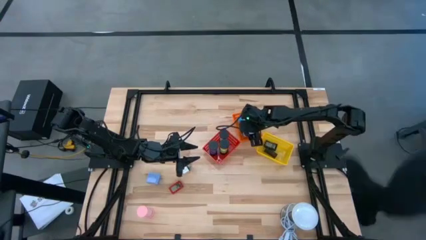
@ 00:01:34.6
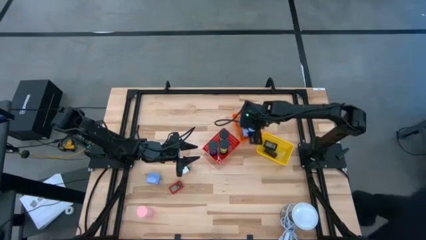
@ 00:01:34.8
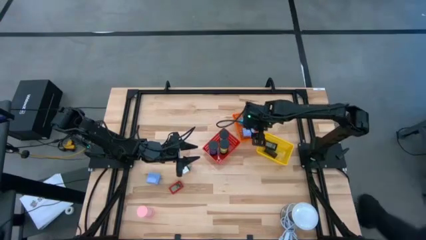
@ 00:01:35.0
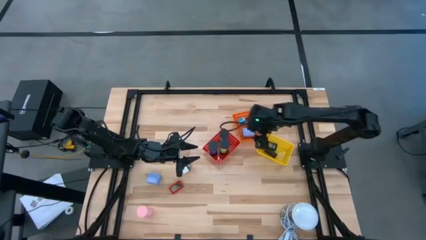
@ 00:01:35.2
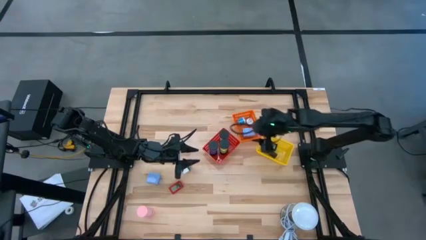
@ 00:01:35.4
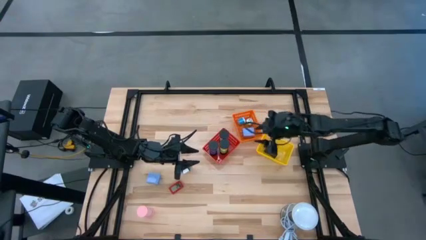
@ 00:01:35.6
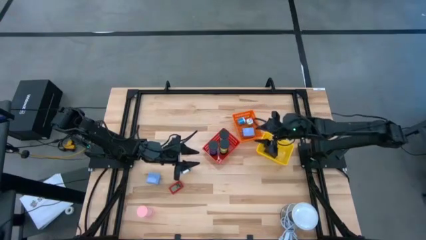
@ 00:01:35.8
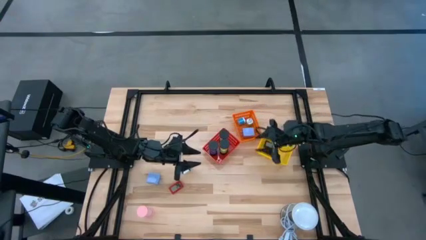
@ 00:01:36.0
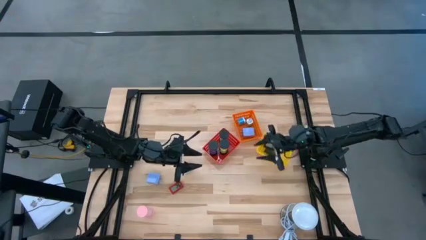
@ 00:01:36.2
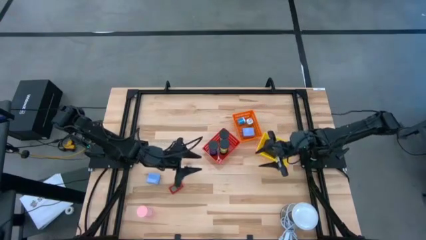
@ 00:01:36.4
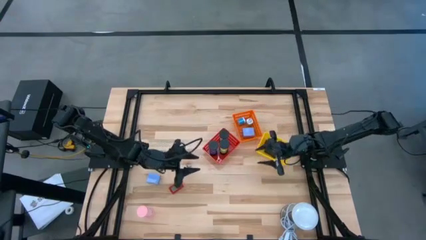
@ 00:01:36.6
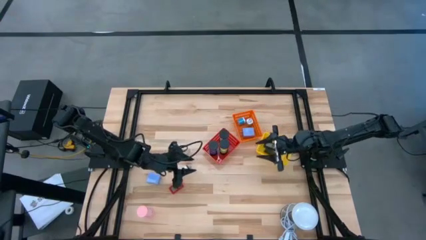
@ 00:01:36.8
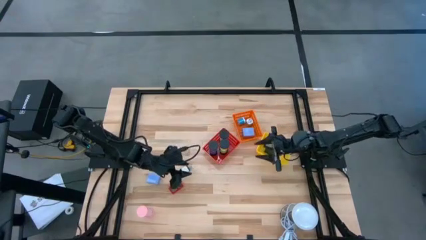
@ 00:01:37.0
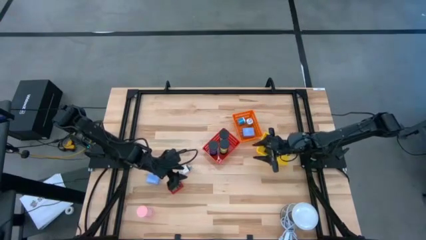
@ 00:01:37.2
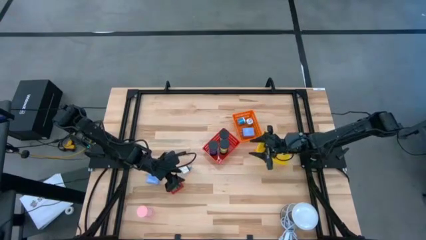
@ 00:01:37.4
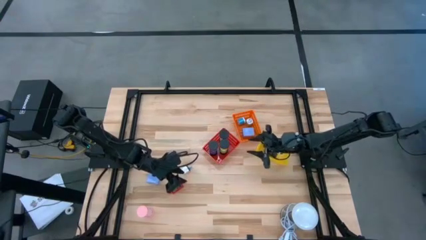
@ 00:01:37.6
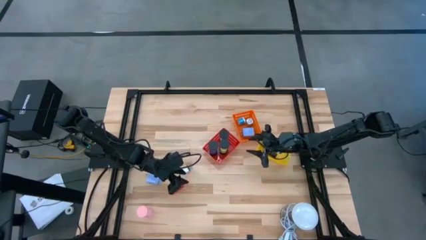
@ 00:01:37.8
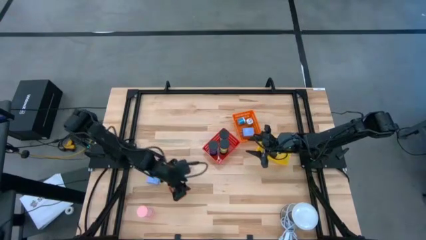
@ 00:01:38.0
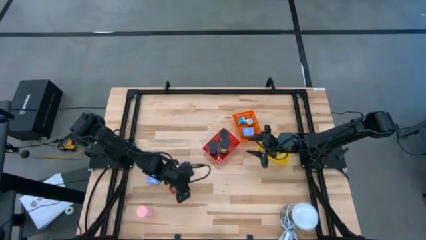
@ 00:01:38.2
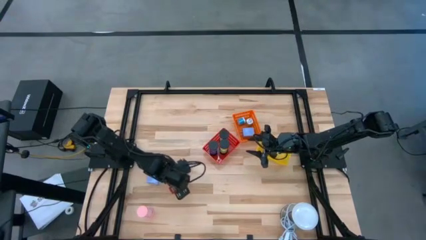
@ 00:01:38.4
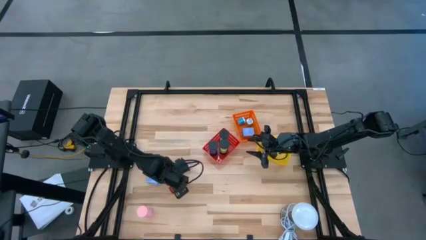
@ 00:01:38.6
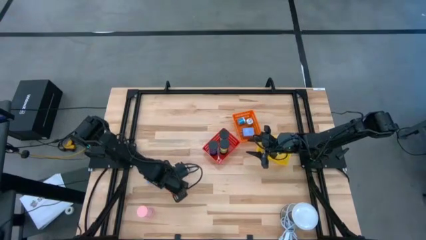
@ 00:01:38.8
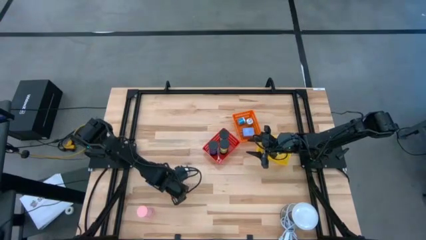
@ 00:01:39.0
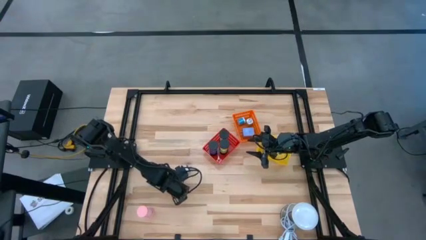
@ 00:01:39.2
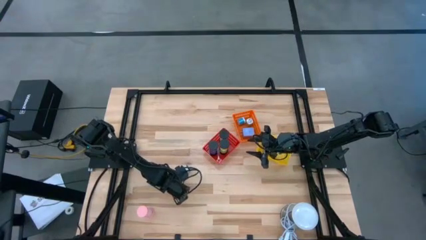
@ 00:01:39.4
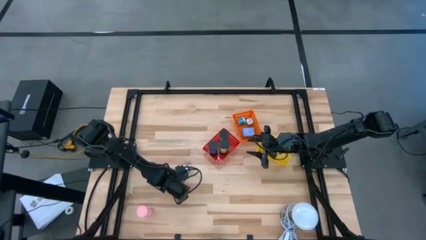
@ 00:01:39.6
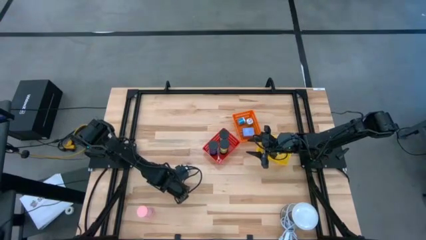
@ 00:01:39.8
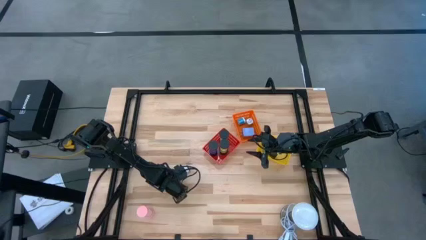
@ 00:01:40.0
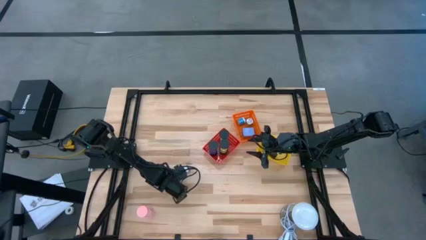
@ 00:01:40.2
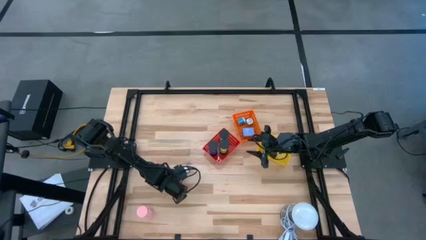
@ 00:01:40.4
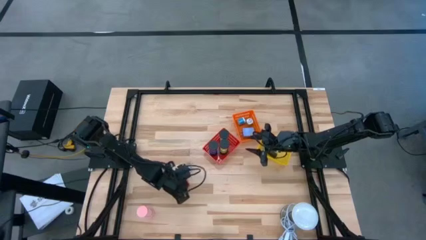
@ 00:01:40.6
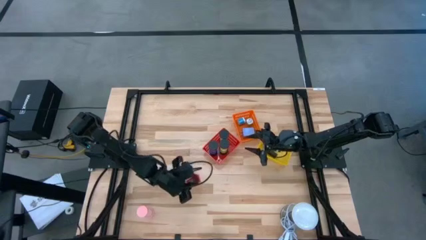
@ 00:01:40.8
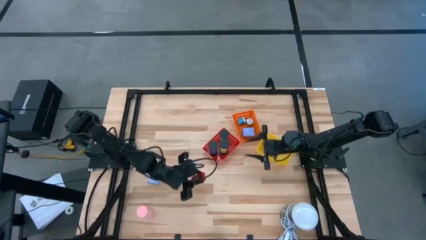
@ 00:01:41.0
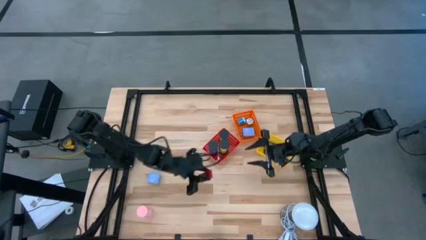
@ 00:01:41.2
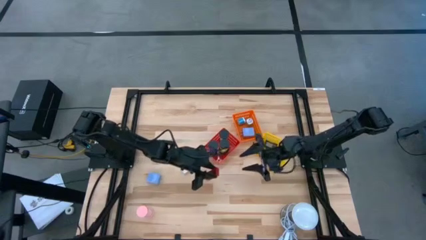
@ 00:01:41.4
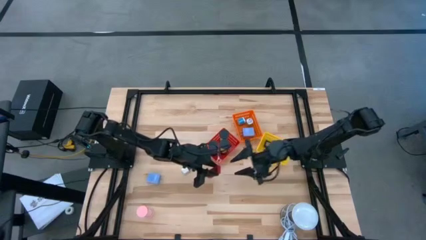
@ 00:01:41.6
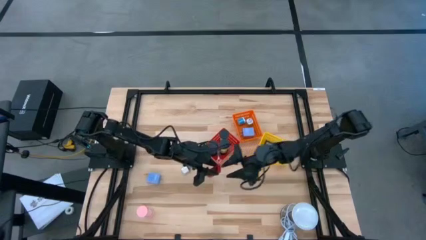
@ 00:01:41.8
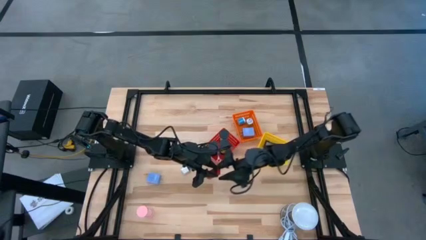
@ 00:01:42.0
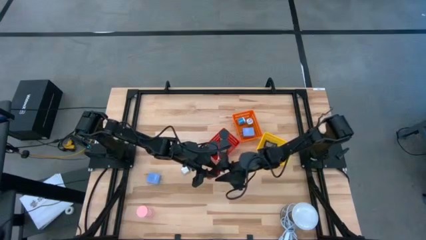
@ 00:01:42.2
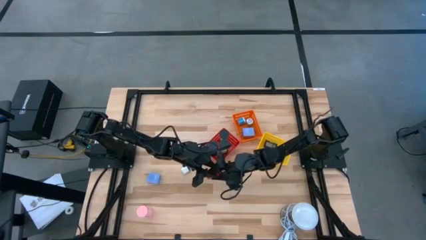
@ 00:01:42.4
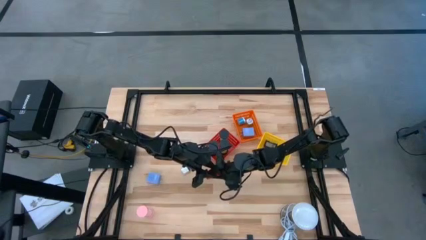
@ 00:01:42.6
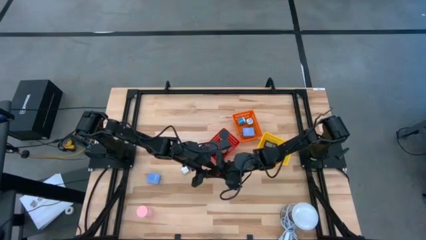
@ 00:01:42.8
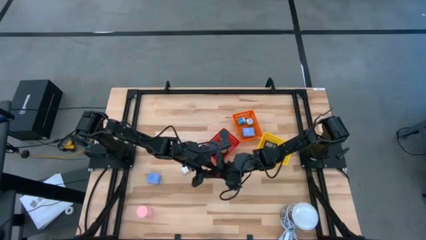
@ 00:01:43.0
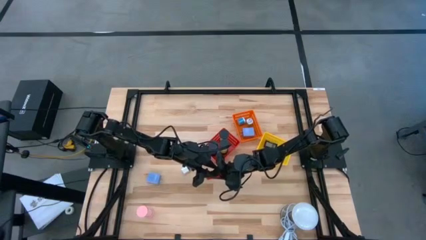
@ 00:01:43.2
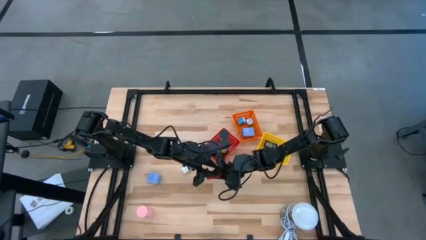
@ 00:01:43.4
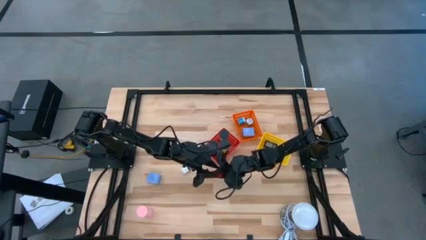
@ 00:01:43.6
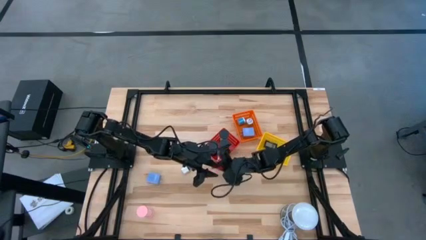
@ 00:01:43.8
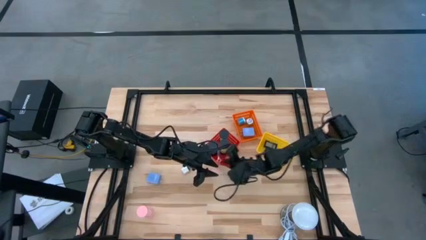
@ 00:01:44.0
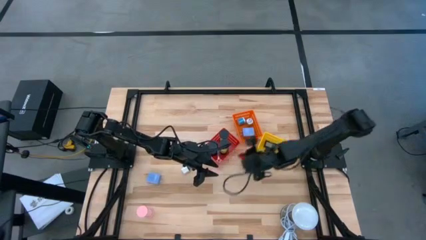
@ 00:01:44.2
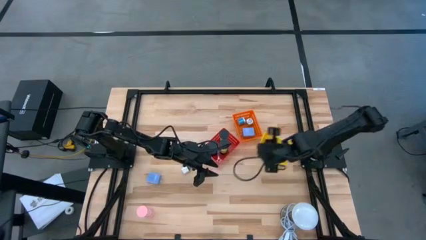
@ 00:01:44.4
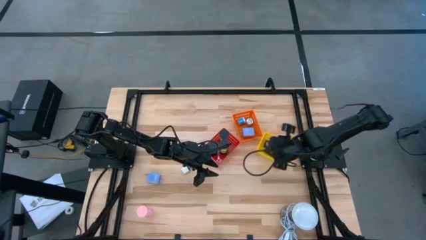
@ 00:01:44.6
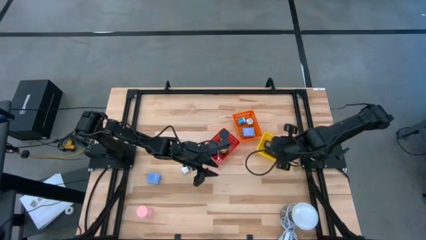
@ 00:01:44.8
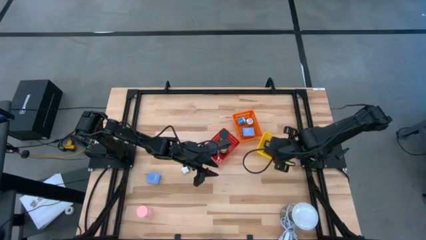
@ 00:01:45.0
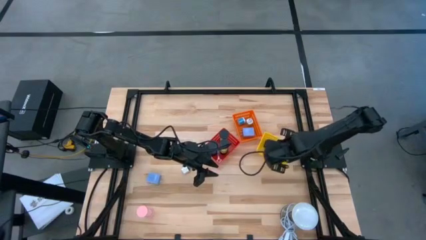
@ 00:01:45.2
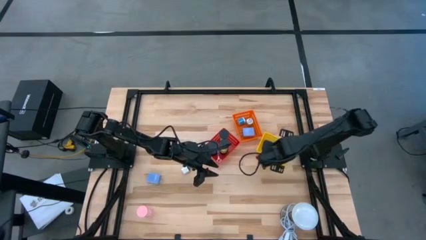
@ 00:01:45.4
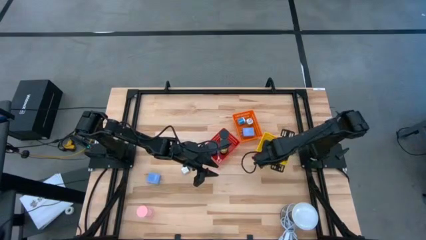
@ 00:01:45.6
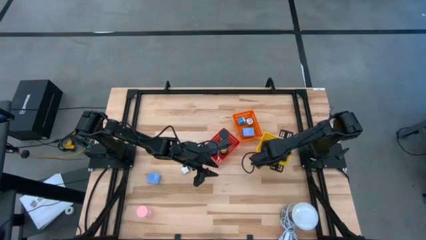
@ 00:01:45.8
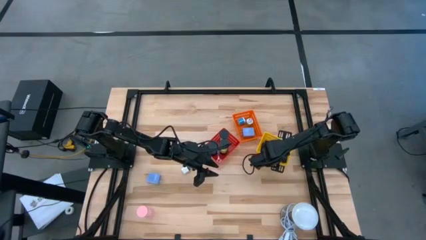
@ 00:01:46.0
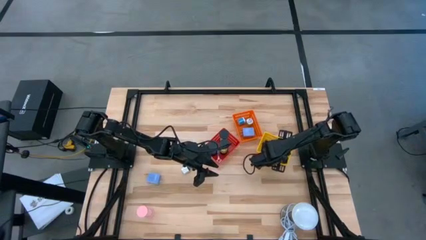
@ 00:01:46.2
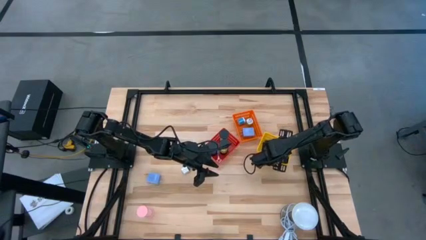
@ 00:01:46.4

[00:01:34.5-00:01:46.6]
Task: Pick & Place Office items
Put the red digital timer into the yellow bin

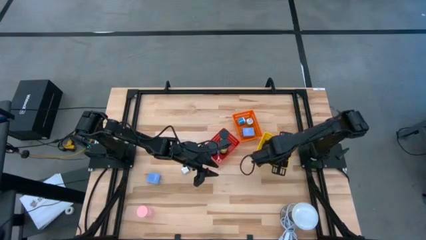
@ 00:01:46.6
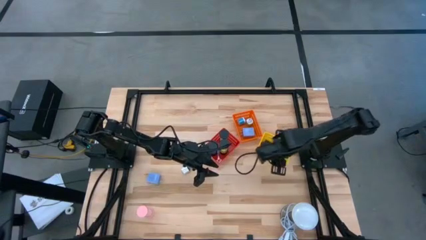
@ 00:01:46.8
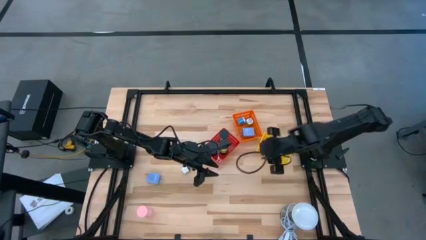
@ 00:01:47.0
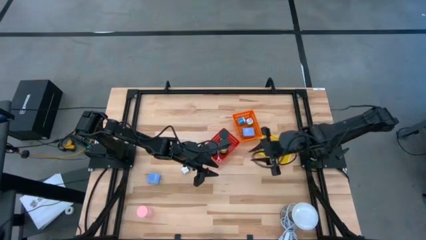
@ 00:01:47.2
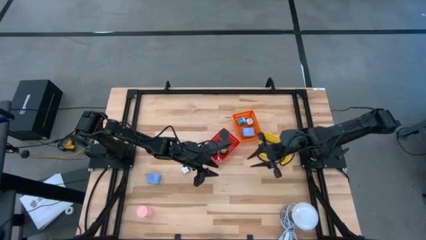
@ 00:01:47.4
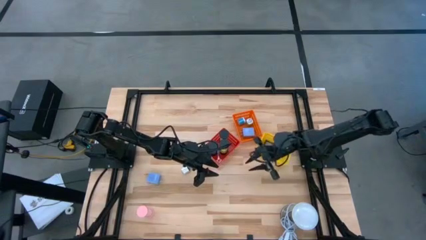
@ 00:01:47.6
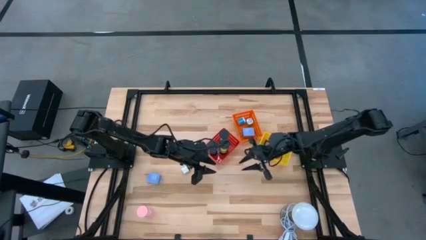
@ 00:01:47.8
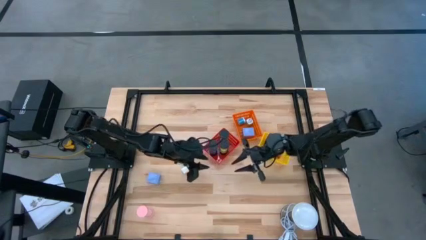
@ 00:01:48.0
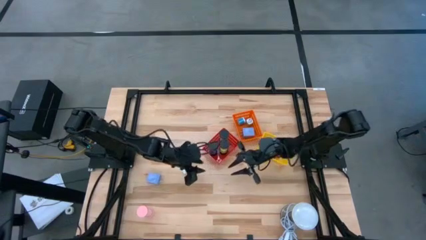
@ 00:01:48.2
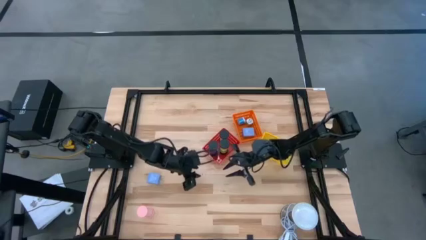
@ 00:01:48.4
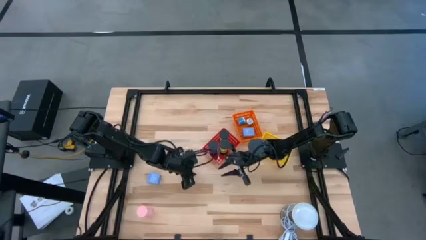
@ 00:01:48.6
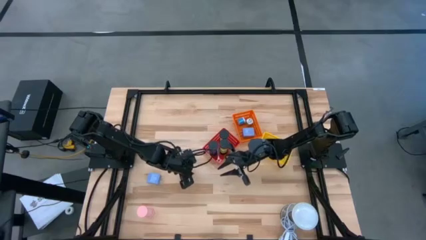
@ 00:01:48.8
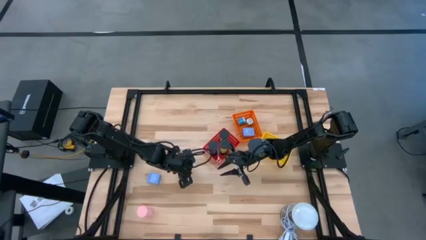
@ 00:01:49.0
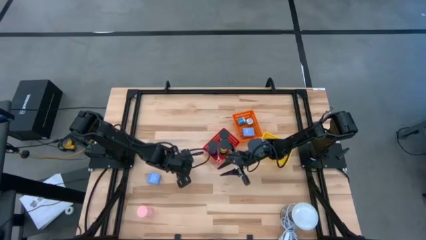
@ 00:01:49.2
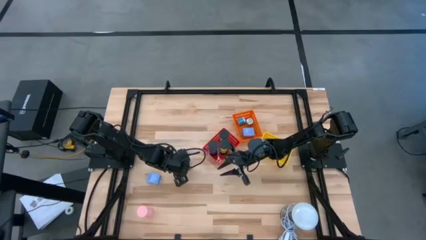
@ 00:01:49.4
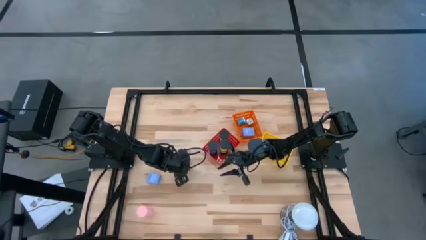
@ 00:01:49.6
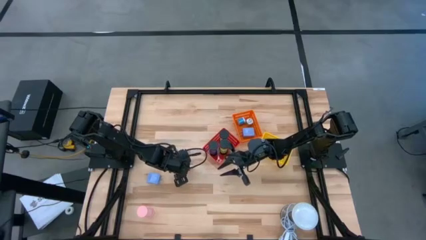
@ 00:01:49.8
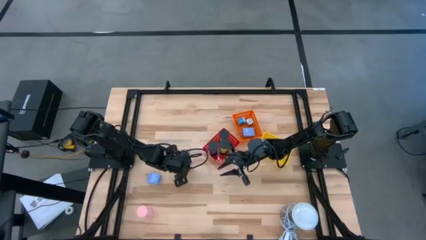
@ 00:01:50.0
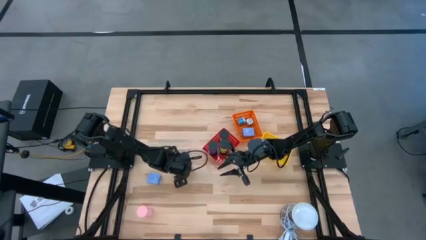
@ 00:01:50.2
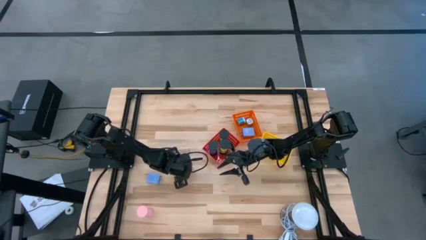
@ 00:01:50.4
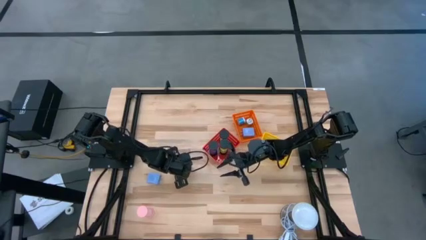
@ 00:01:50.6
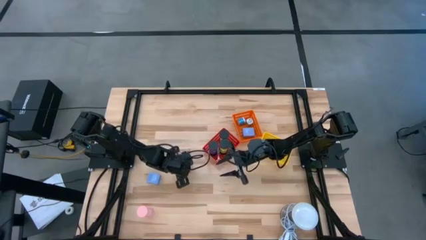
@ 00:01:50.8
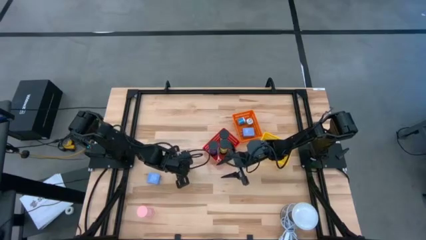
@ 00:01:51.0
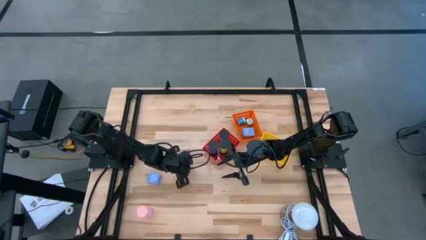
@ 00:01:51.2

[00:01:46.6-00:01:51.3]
Put the white charger adapter into the orange bin
